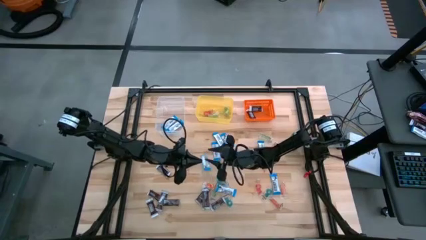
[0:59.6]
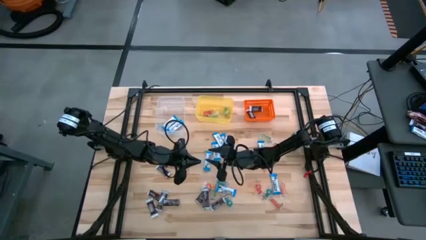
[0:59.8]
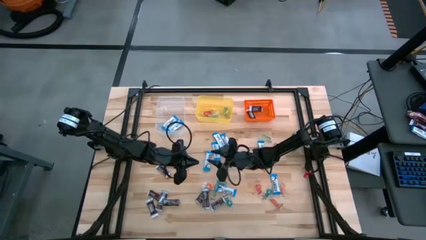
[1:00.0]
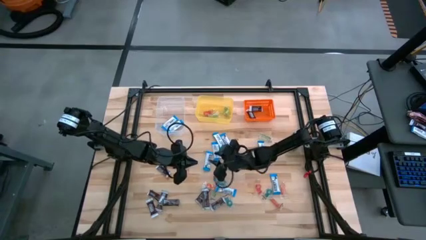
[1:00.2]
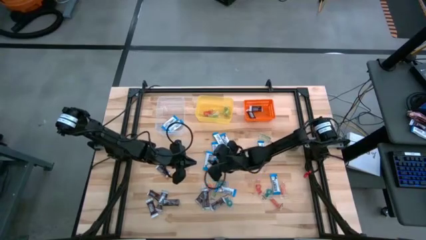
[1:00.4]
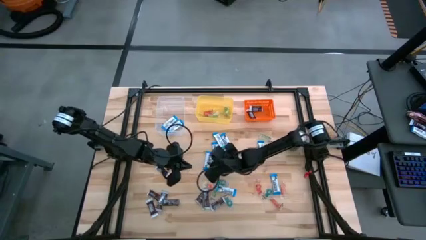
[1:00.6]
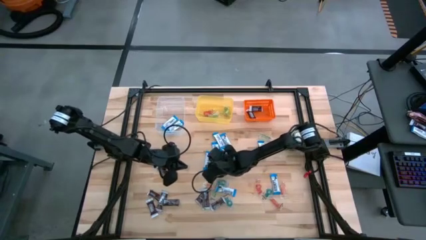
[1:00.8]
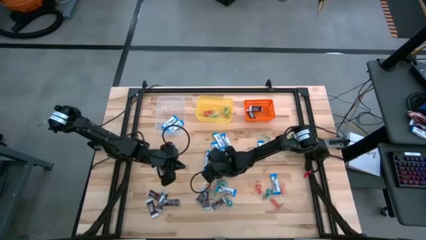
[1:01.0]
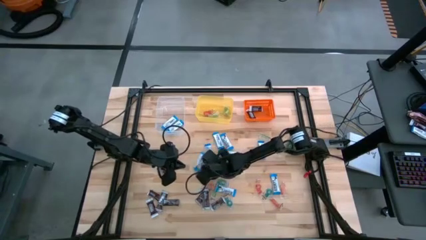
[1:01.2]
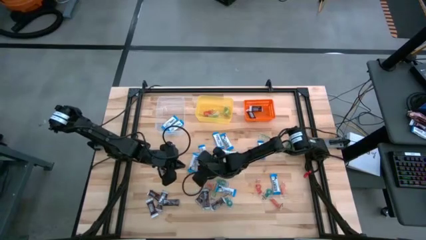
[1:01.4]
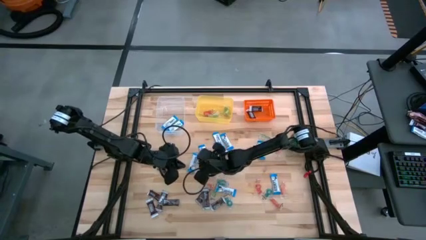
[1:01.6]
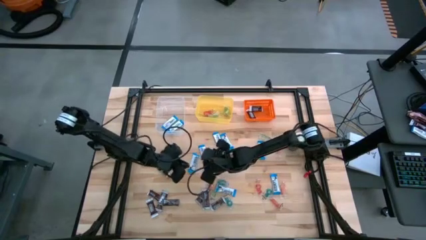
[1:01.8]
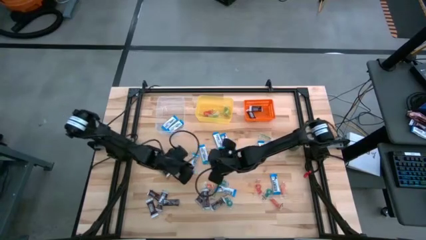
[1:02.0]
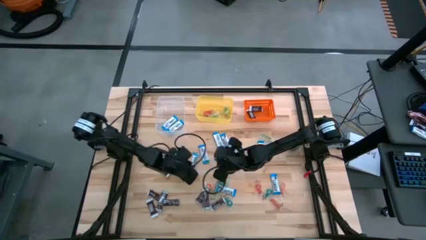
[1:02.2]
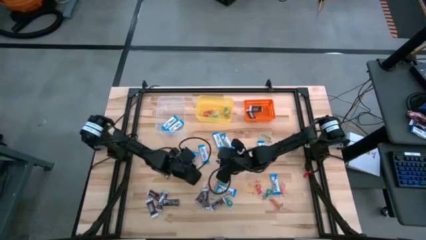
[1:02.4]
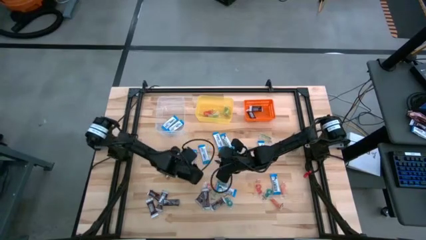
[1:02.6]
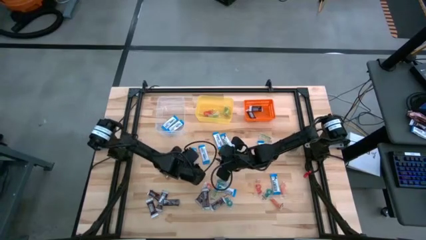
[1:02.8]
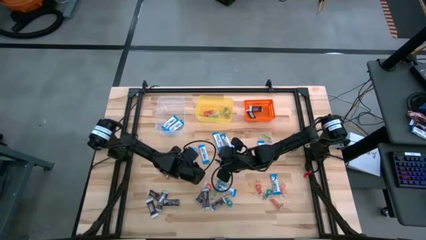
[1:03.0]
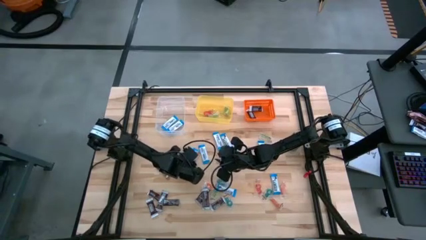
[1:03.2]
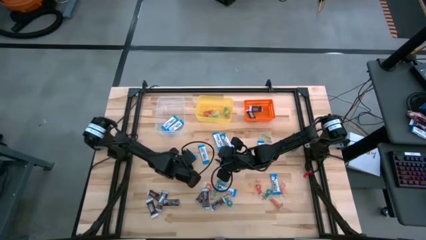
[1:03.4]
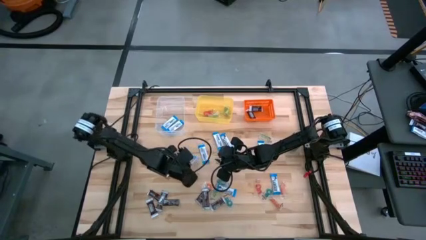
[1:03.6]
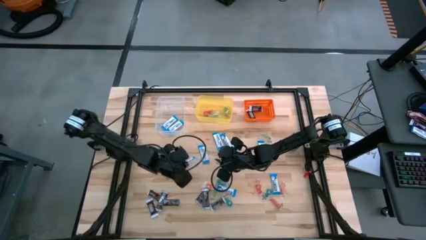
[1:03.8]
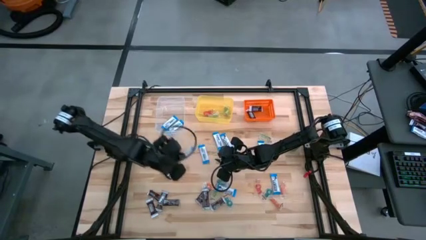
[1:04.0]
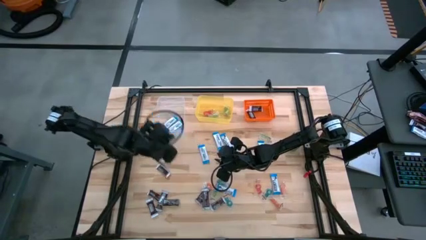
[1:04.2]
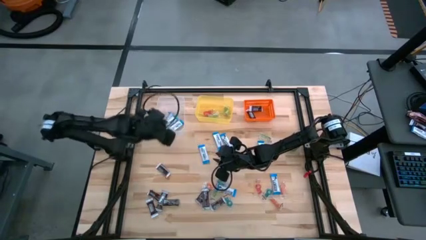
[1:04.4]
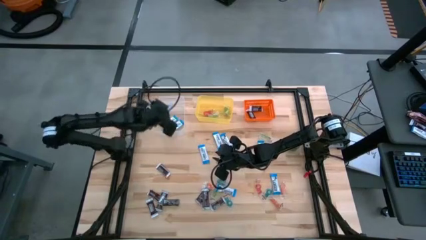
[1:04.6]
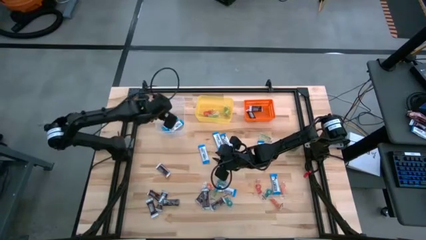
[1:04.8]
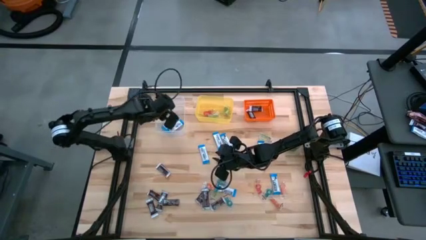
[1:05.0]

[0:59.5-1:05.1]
Task: Sort candy
Put the white chocolate into the transparent bin

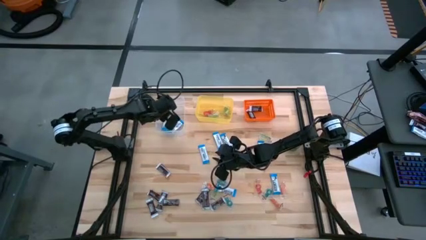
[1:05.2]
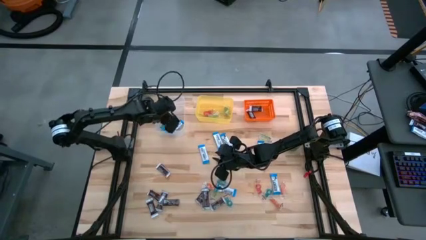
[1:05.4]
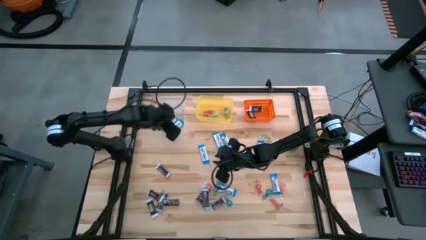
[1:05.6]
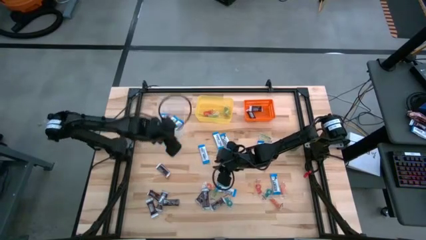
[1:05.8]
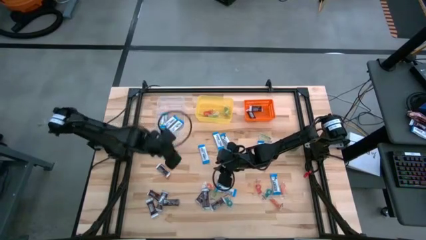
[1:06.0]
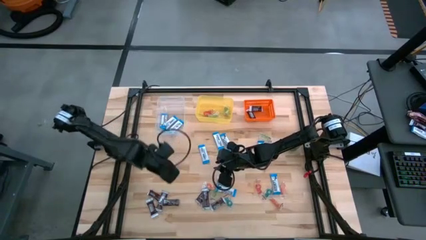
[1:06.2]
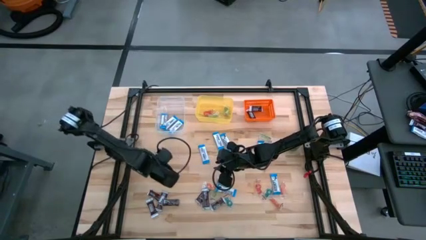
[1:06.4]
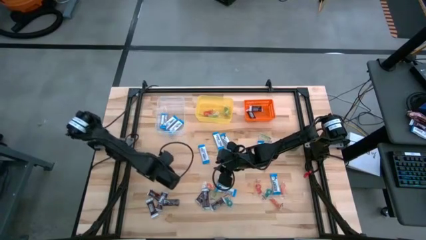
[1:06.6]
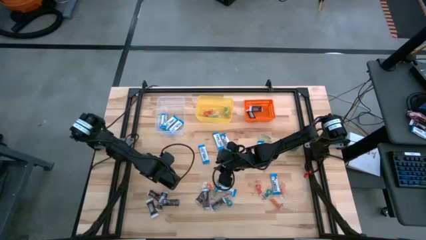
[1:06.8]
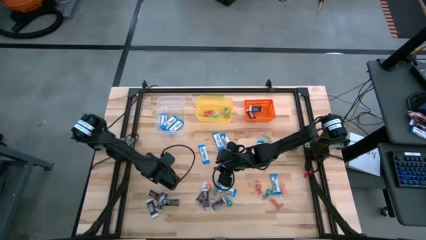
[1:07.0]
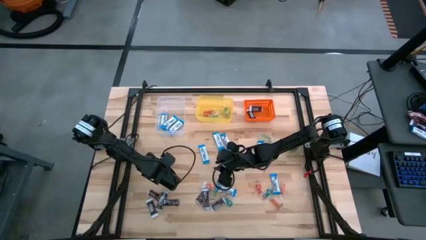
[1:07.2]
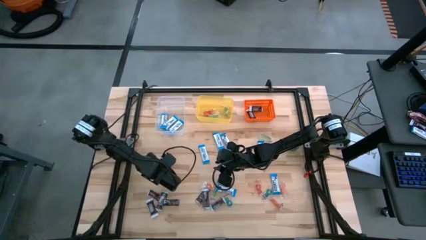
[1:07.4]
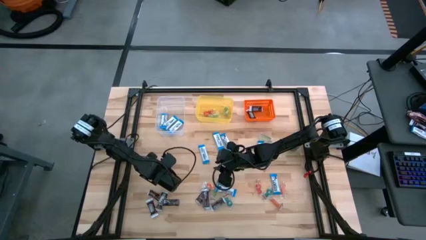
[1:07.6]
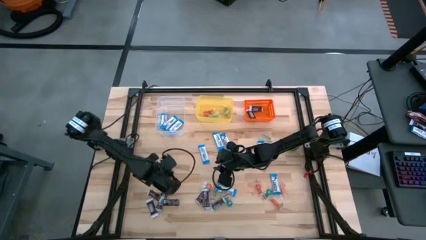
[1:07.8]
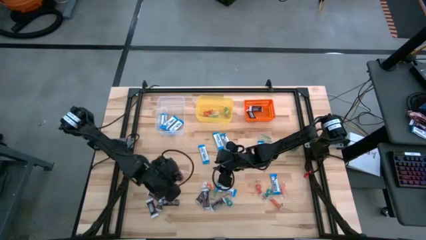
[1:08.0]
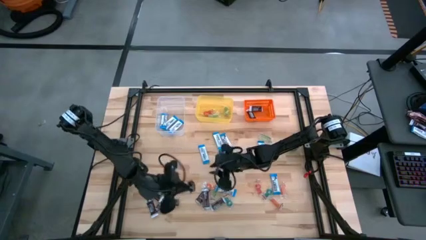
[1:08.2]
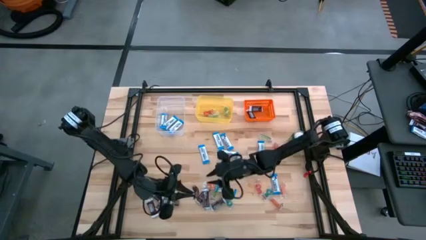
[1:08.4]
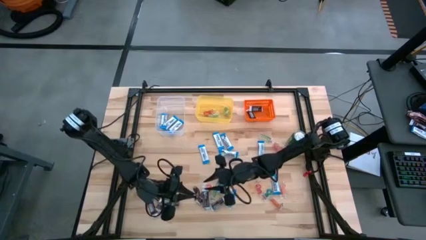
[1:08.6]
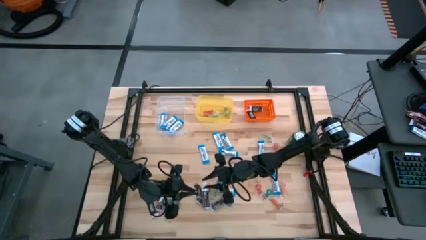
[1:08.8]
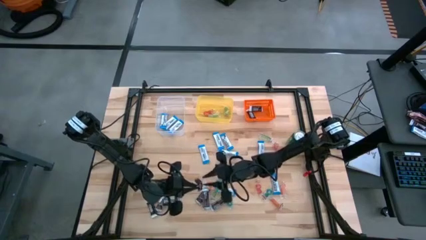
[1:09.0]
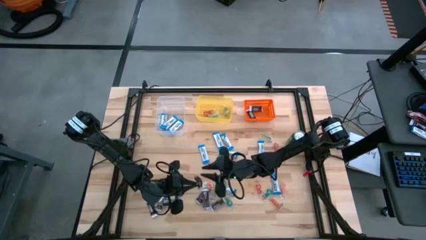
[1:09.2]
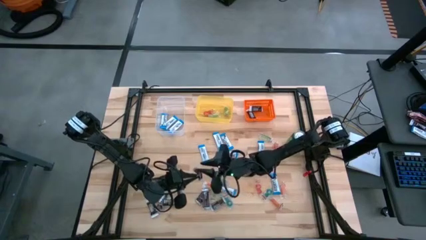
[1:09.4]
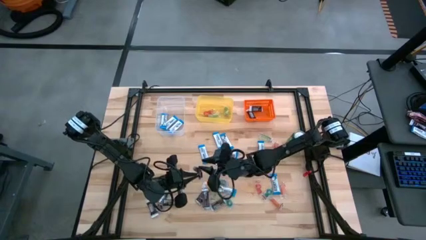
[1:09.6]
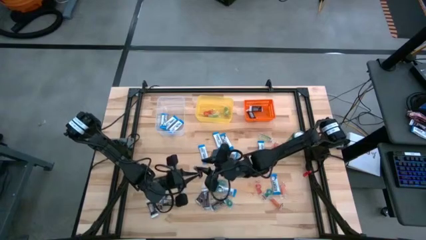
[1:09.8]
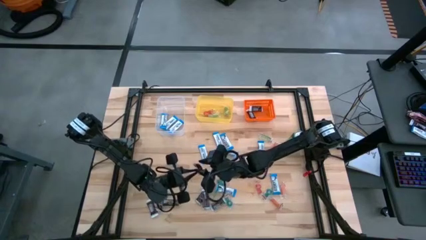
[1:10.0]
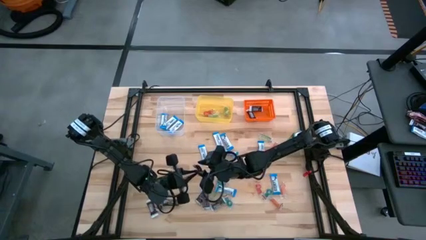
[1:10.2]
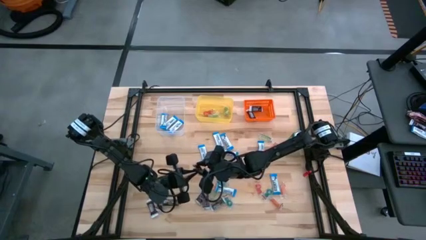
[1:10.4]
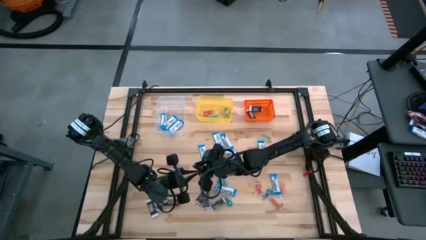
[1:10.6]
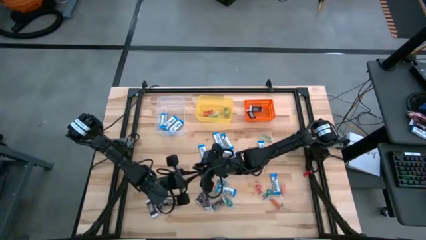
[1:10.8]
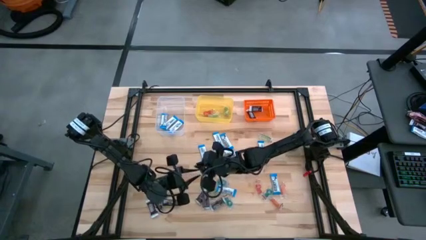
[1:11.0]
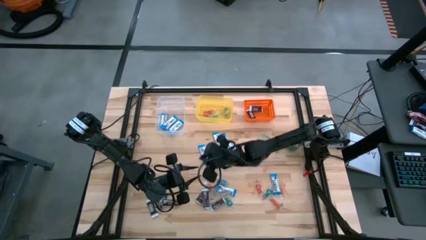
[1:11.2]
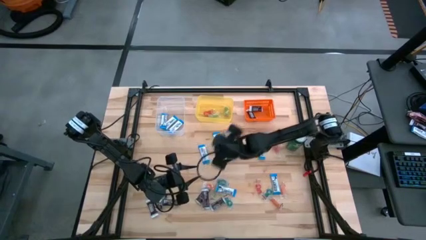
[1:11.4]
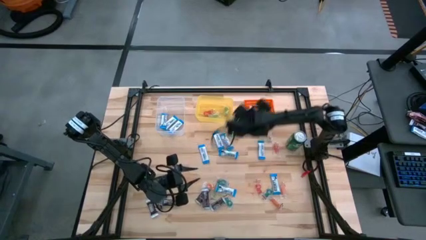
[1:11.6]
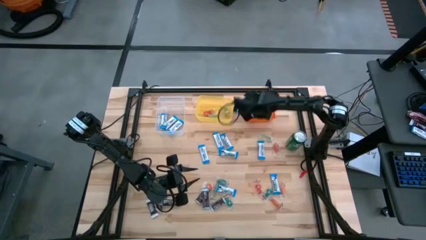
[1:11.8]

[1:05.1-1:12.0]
Put the black chocolate into the orange bin

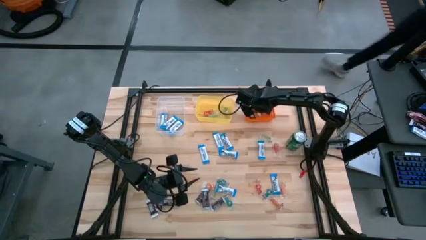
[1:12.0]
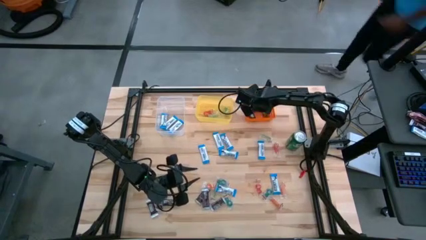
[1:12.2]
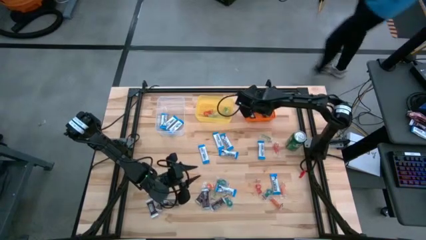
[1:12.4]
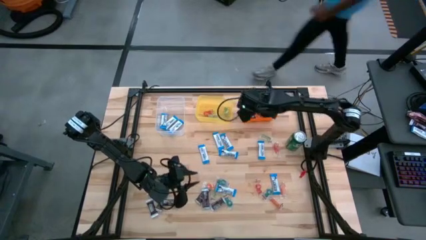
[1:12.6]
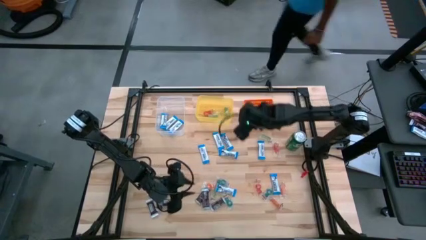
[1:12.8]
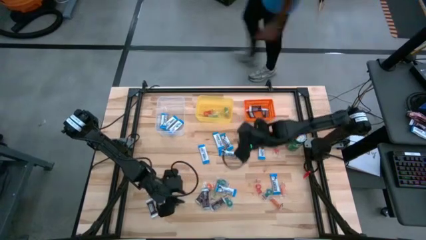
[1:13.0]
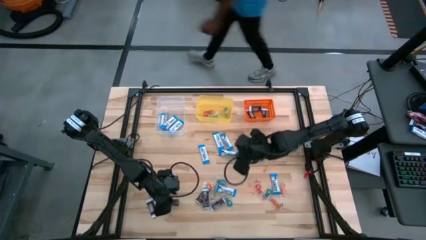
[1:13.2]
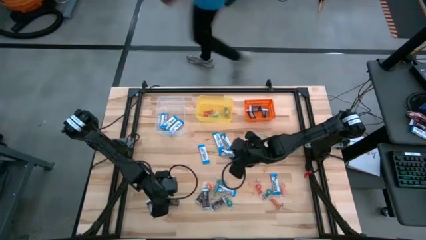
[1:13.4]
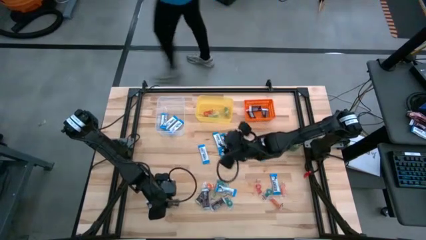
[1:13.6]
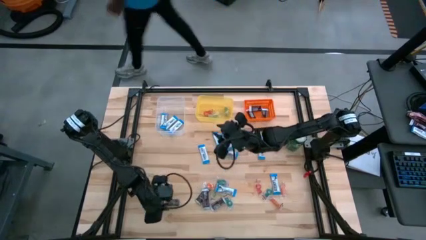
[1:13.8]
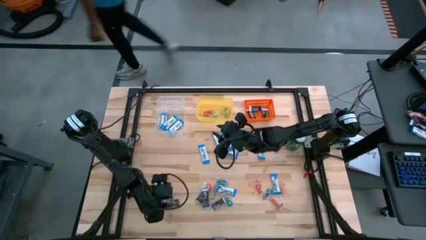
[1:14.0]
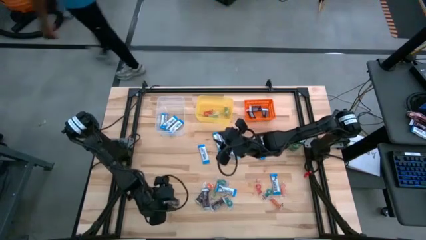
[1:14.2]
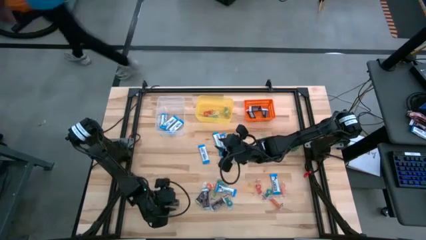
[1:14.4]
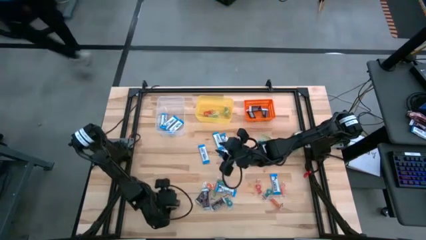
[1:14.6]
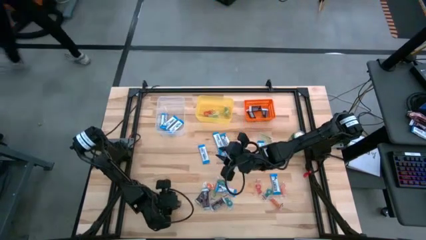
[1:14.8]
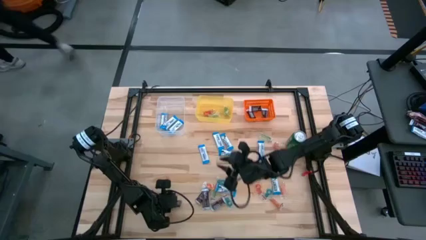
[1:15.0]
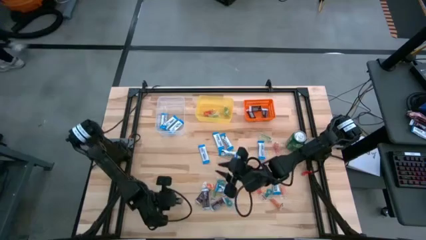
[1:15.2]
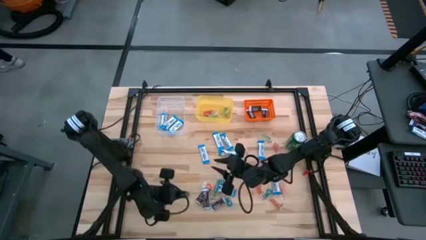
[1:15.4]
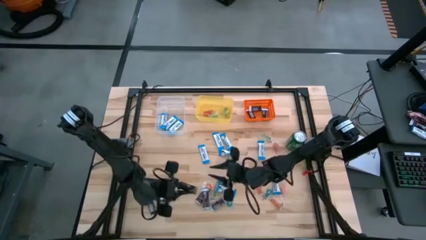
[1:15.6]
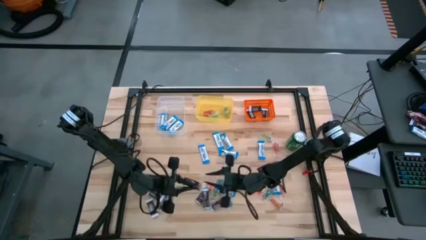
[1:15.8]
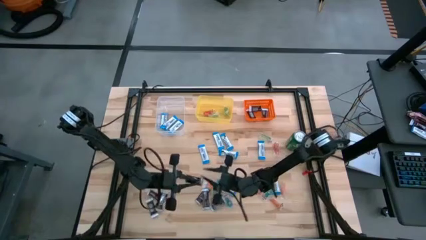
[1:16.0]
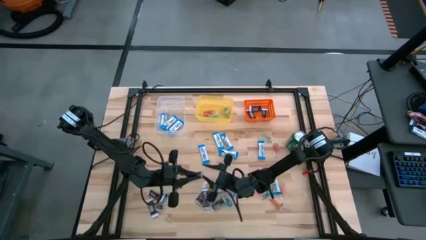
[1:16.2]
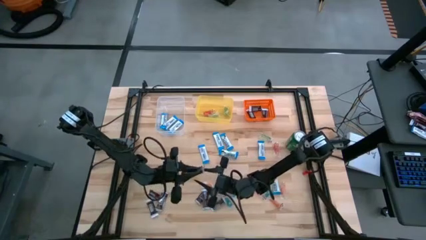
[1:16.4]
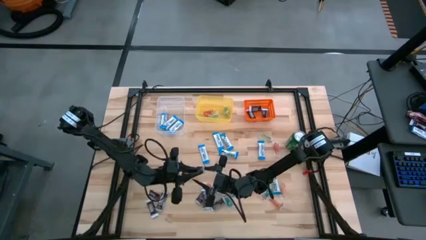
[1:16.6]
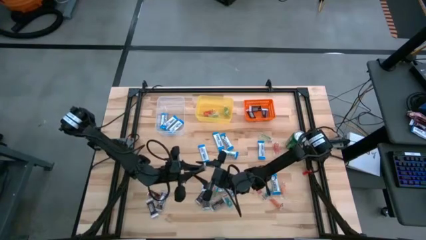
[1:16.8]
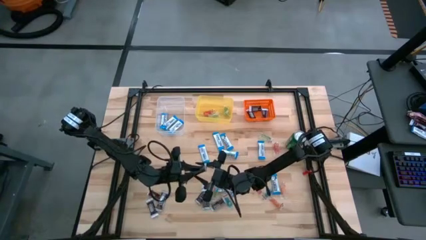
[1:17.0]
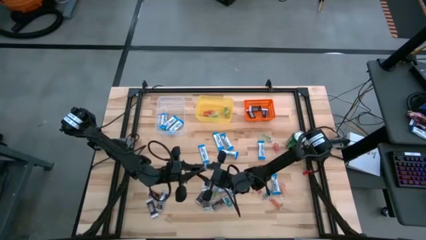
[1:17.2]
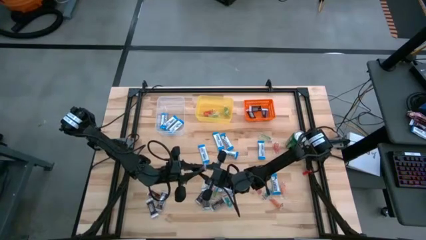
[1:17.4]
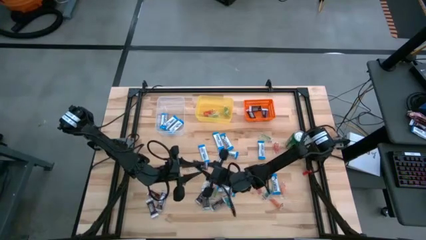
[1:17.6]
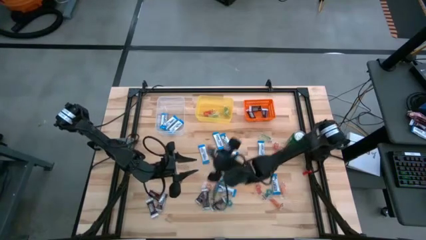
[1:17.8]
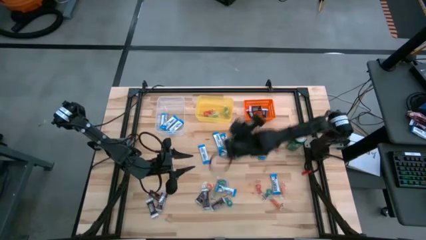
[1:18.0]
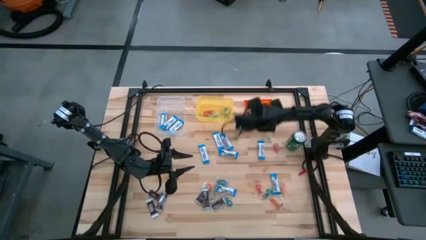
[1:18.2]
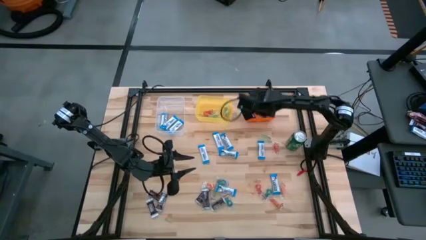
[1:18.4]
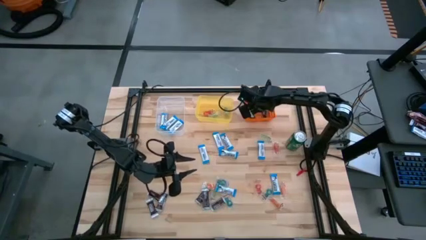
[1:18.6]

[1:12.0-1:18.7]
Put the black chocolate into the orange bin
